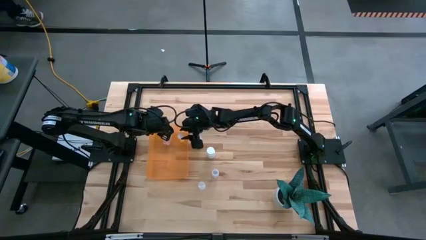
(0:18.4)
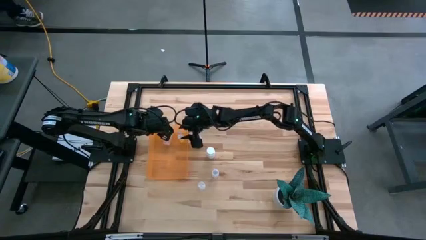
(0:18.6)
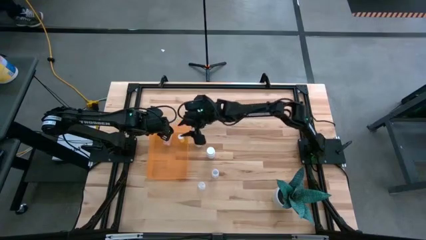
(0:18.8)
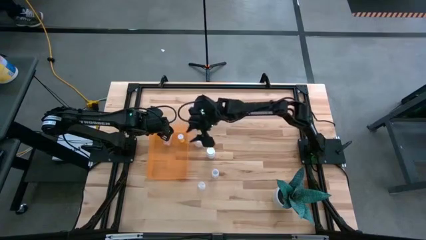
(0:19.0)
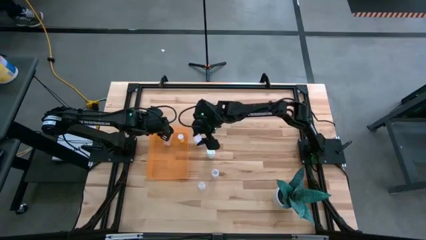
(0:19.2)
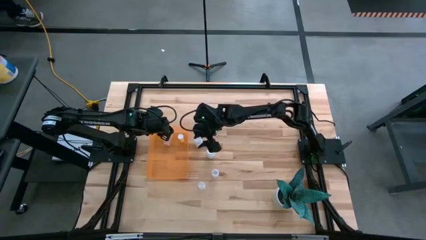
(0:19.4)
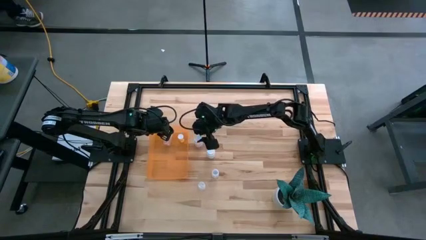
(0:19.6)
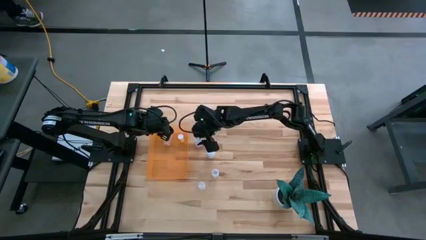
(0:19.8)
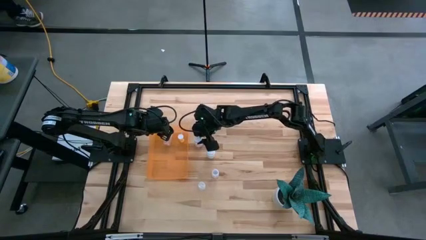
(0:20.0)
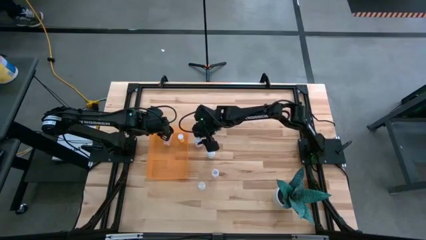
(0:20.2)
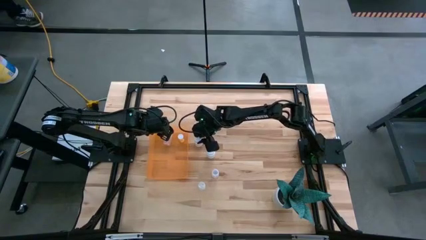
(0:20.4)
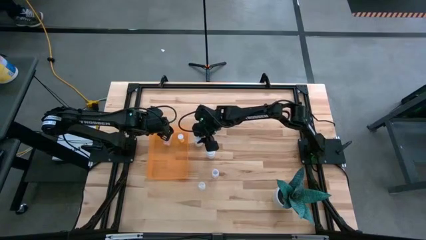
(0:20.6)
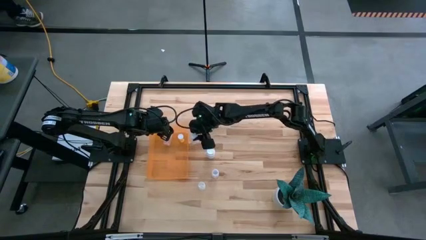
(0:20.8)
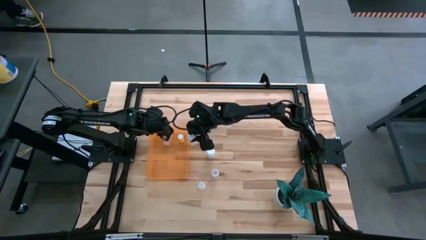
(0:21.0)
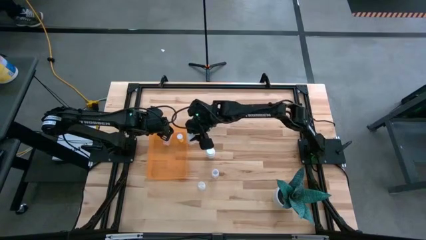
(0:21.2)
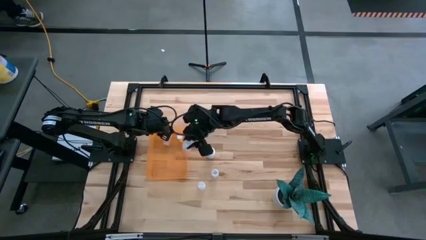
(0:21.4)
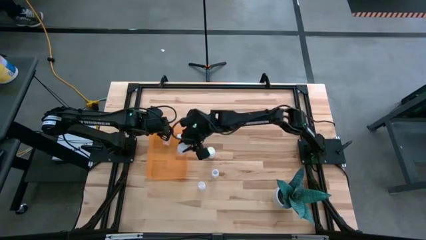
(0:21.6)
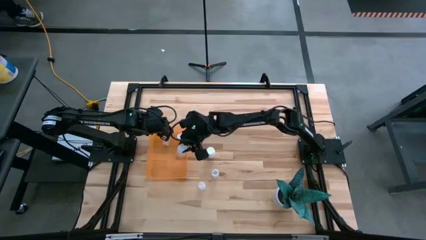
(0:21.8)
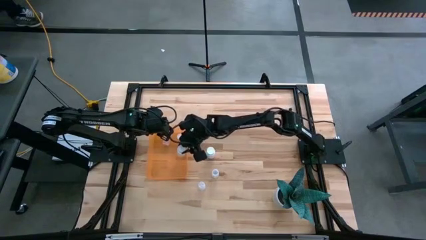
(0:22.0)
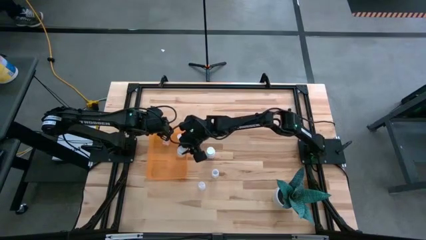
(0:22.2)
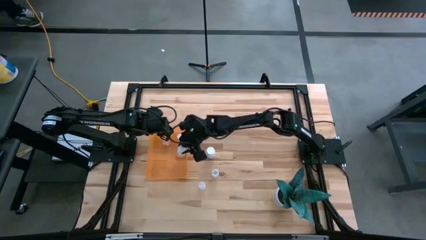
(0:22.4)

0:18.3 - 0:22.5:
Task: Pick and place pill bottles into a basket
Put the top white pill bottle into the orange bin

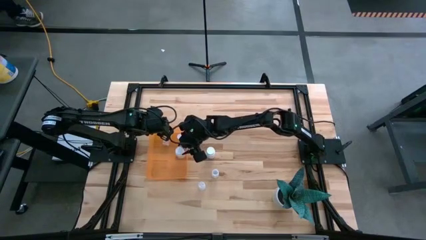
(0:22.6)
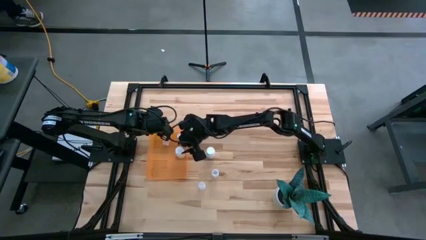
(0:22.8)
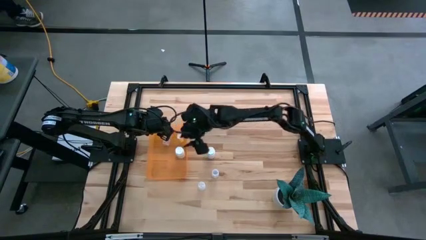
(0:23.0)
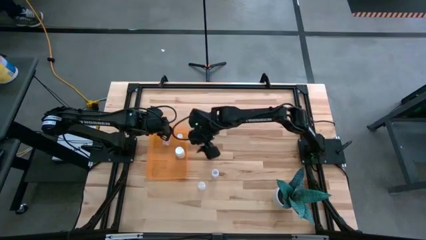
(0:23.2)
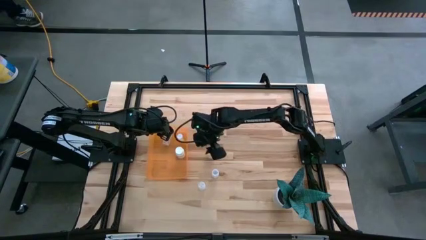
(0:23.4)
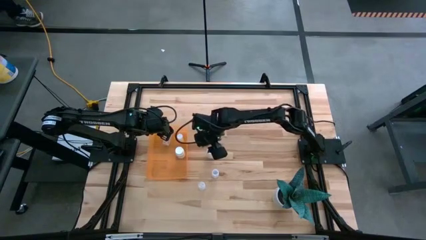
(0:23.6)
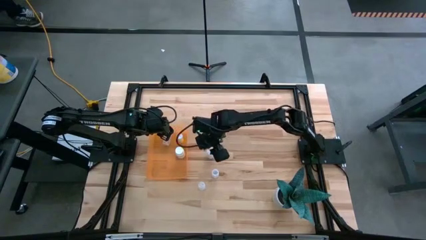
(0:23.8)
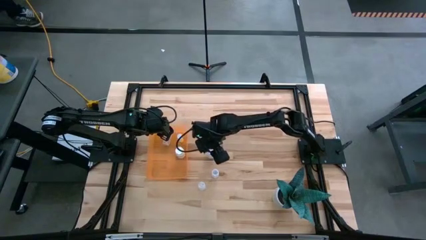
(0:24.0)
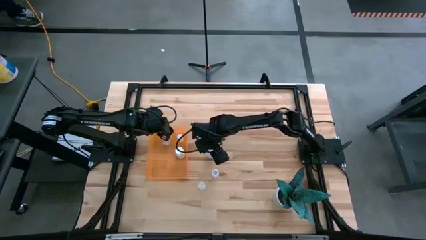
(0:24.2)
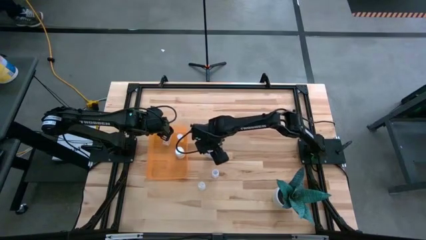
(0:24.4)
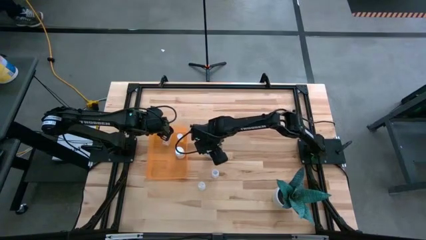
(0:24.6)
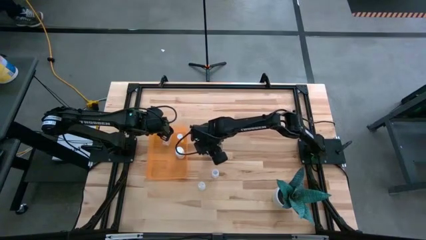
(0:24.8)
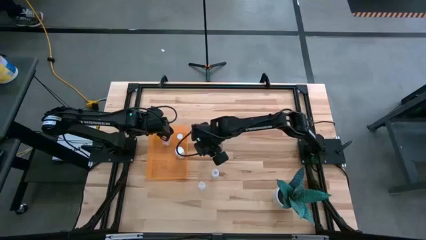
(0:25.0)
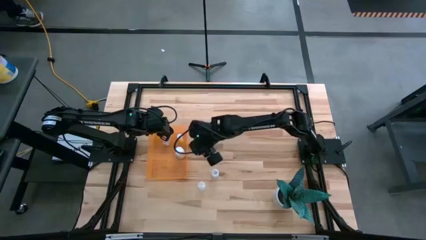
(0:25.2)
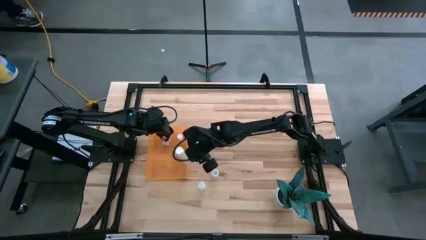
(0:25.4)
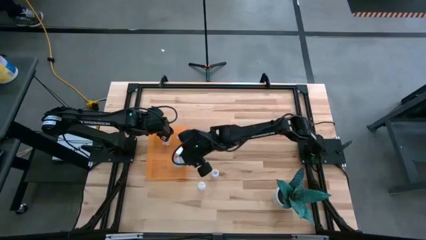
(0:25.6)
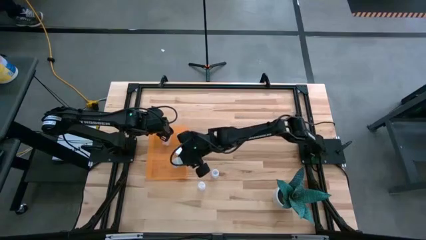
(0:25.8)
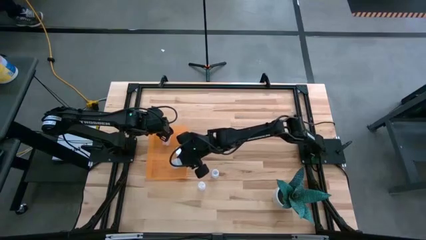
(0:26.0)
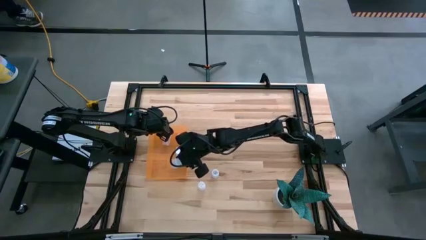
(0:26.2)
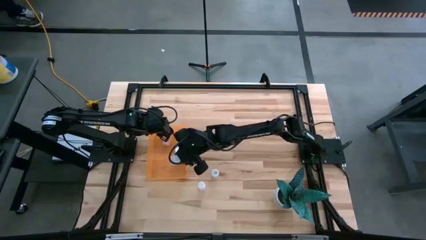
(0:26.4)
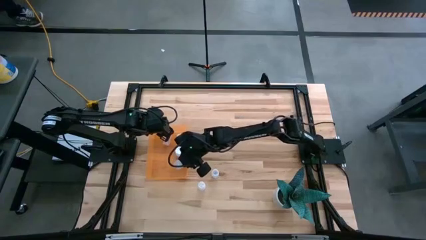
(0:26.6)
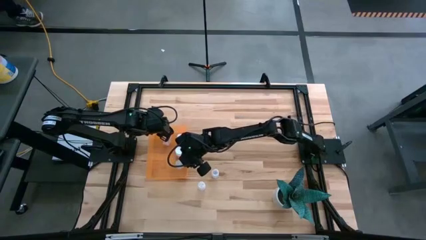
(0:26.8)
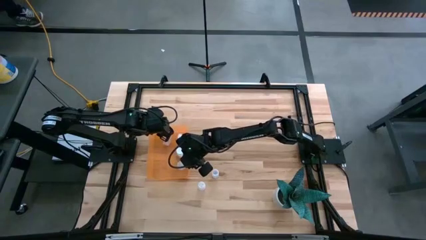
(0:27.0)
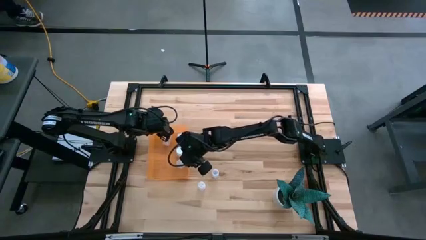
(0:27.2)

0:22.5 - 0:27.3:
Put the white pill bottle into the orange bin

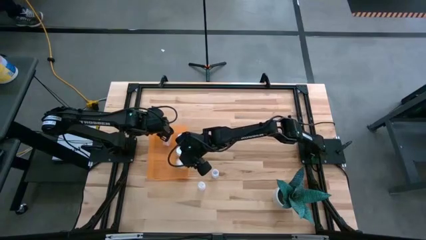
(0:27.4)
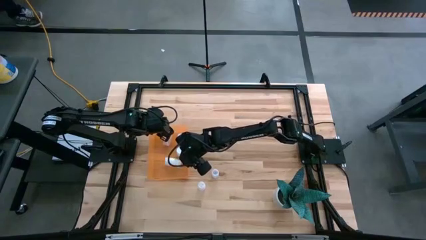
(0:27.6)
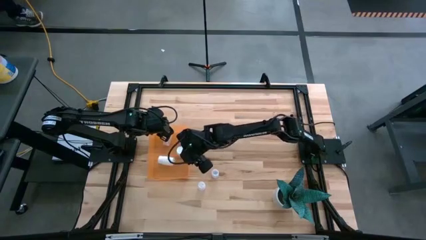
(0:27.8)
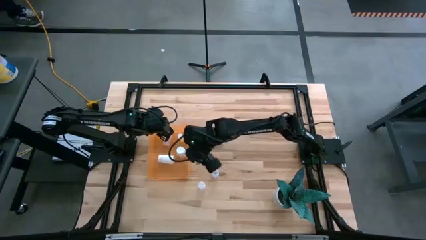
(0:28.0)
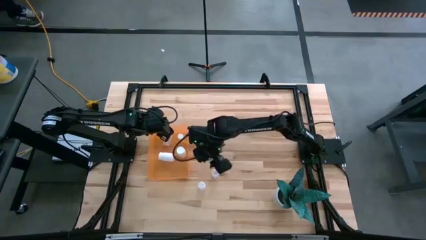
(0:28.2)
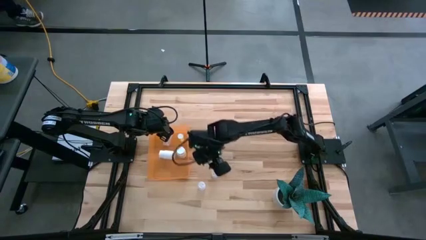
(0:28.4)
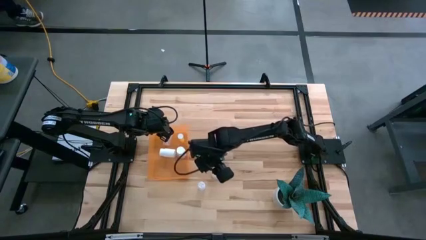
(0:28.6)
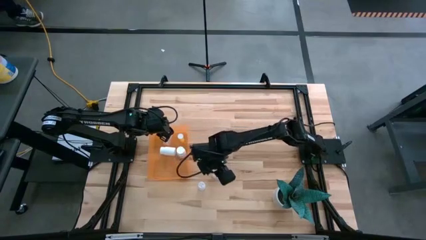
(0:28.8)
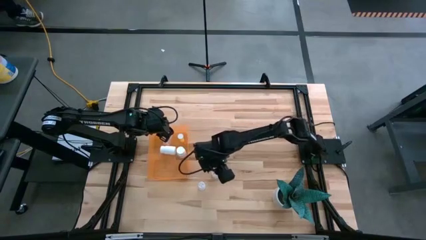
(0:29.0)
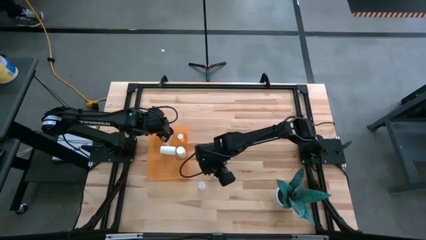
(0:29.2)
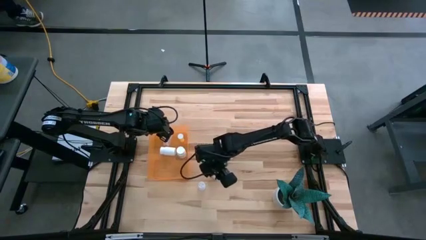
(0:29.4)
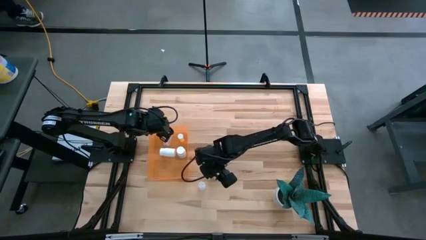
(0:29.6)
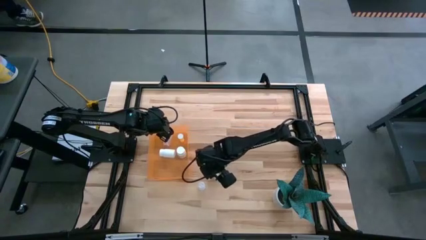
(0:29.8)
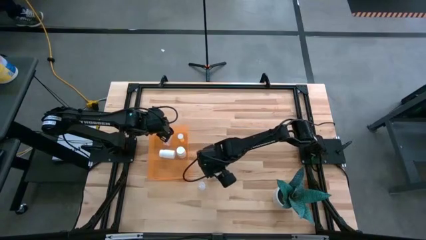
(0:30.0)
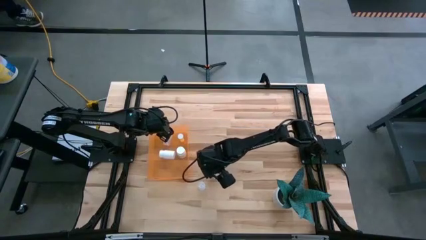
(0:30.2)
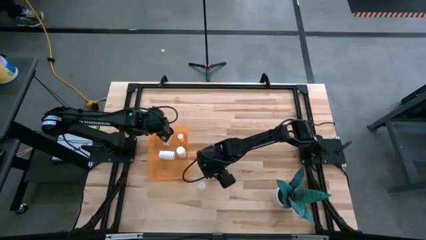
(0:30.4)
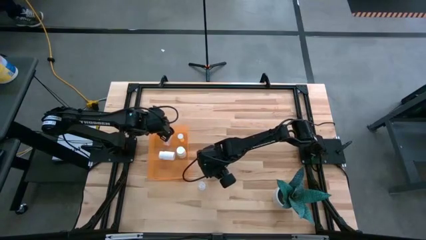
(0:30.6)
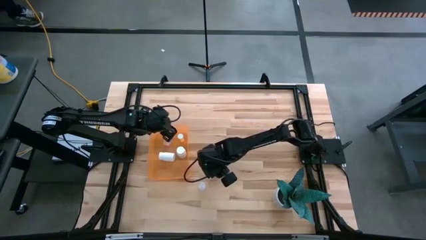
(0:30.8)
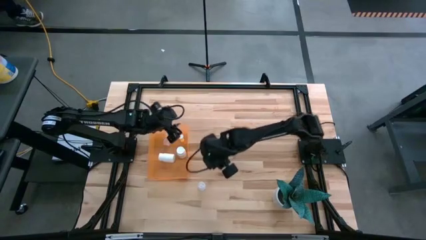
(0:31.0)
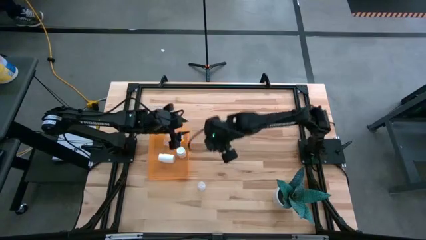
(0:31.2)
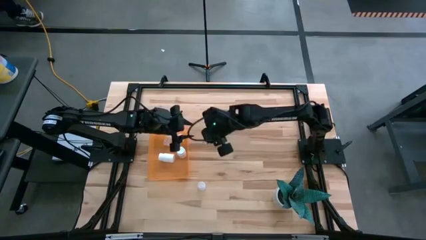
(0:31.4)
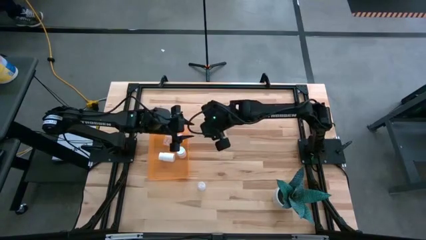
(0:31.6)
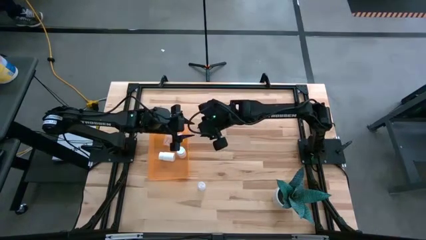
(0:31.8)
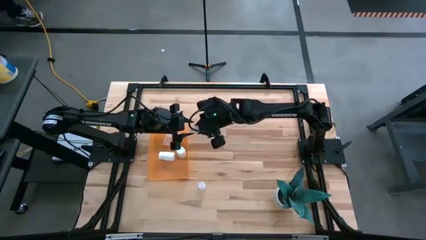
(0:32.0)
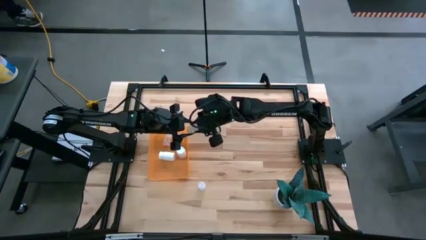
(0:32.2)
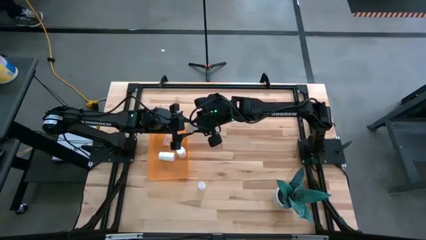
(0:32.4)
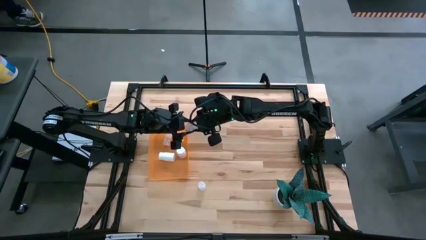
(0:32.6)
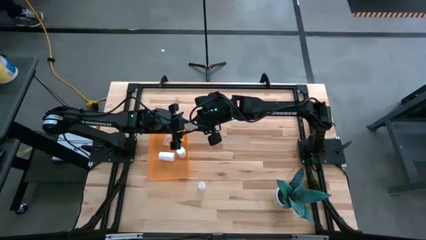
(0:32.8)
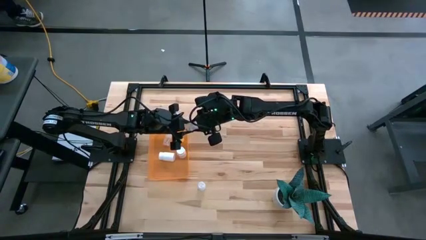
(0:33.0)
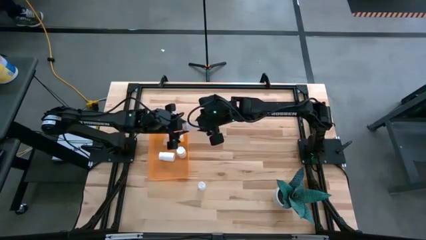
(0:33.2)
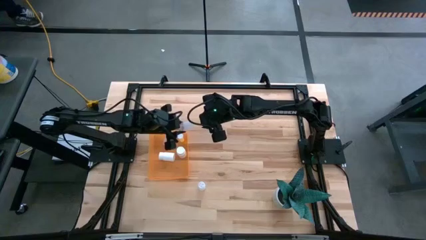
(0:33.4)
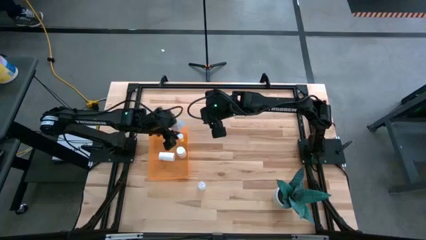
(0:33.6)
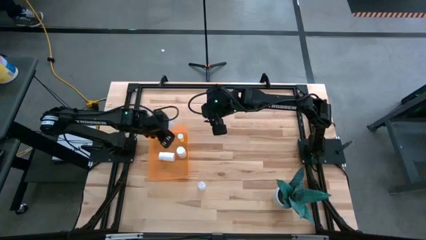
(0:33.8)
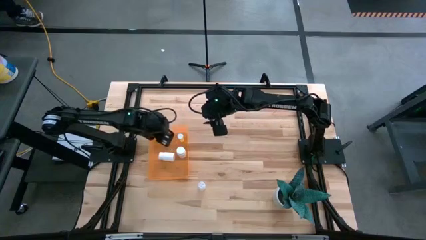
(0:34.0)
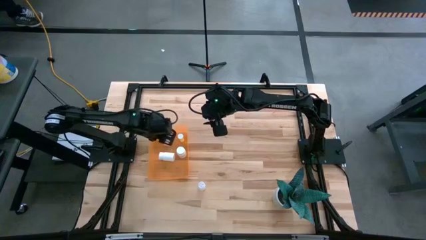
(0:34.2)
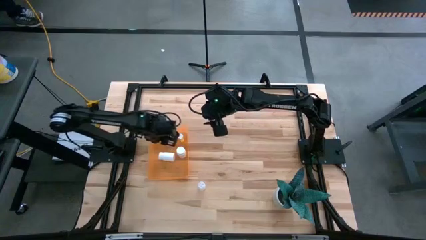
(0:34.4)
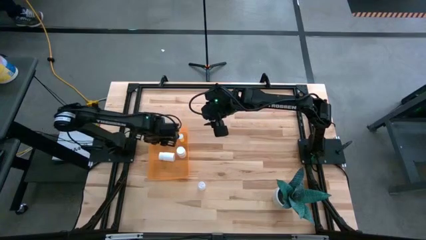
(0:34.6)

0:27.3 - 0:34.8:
Put the top transparent pill bottle into the orange bin
